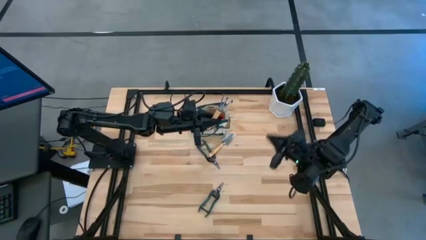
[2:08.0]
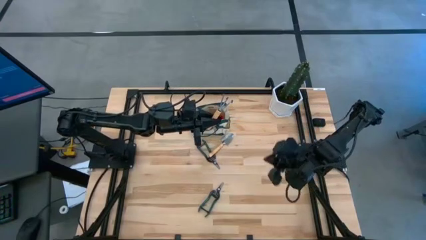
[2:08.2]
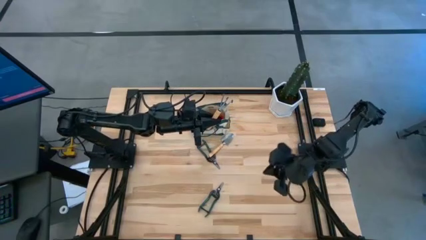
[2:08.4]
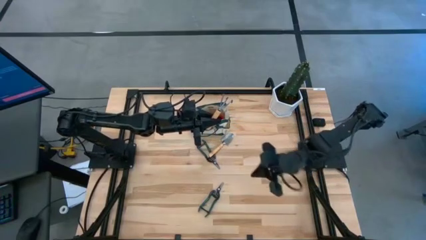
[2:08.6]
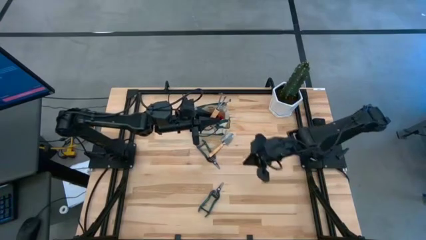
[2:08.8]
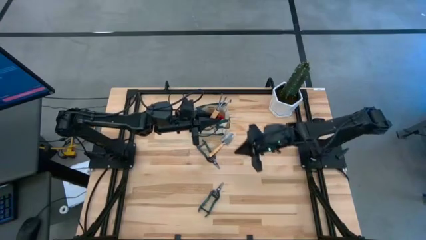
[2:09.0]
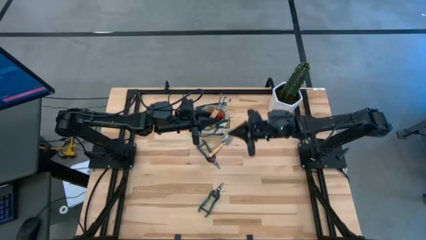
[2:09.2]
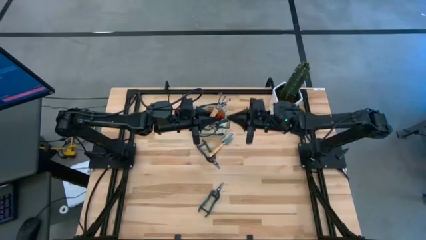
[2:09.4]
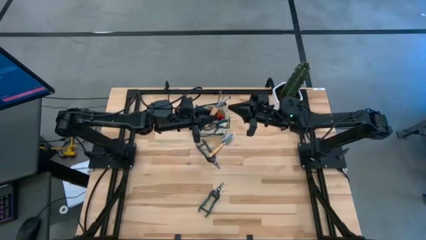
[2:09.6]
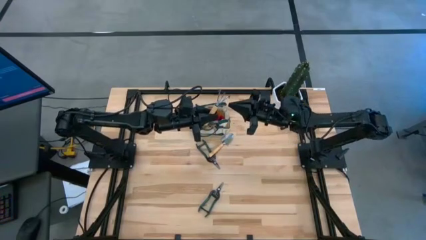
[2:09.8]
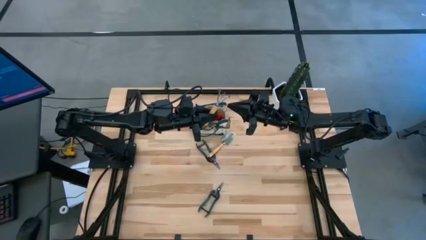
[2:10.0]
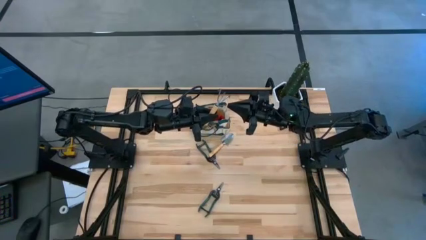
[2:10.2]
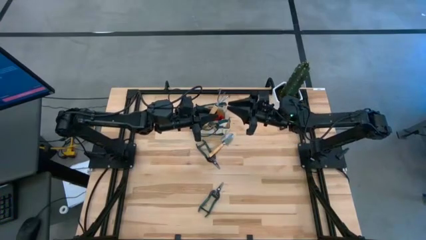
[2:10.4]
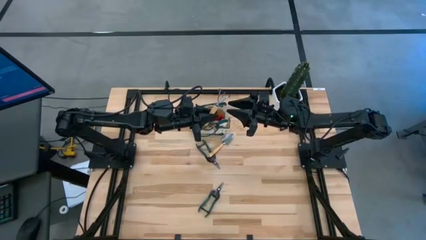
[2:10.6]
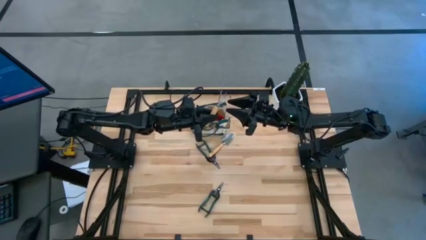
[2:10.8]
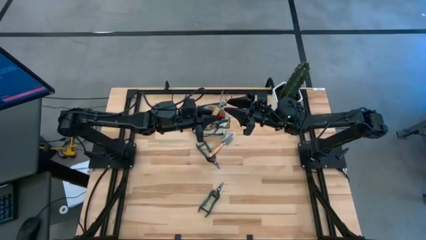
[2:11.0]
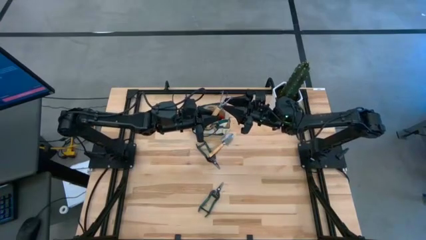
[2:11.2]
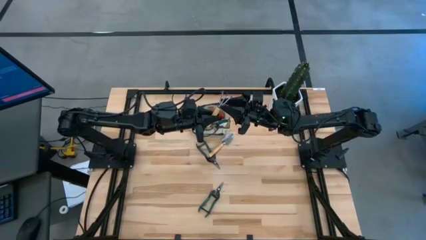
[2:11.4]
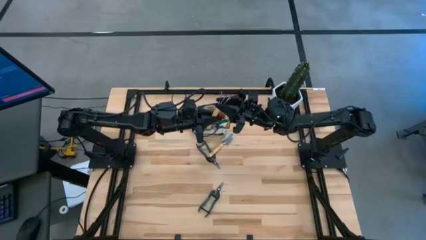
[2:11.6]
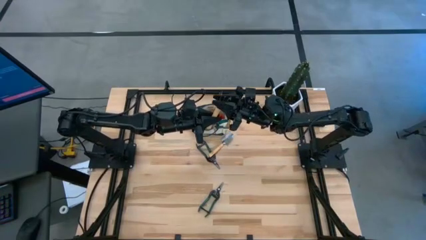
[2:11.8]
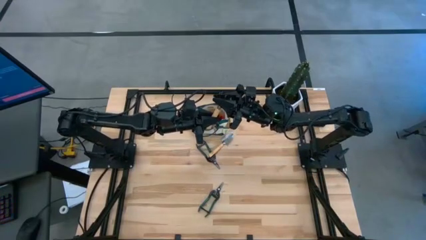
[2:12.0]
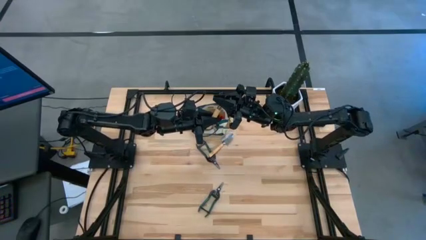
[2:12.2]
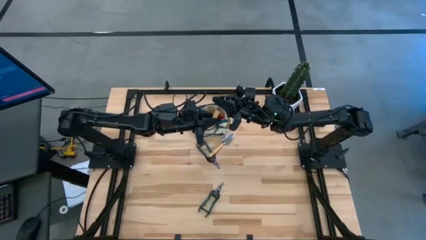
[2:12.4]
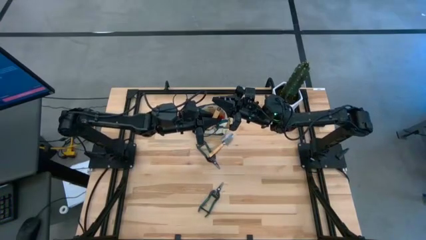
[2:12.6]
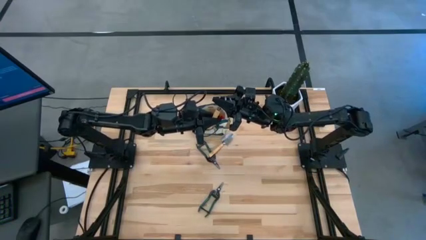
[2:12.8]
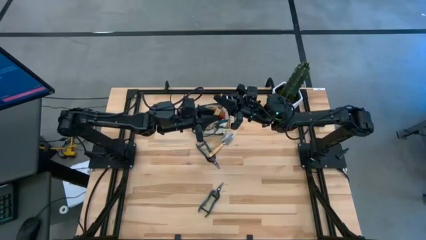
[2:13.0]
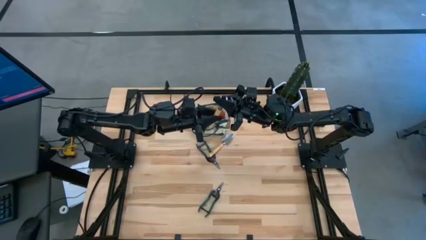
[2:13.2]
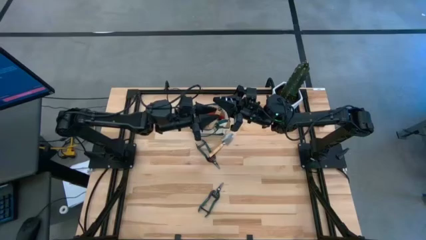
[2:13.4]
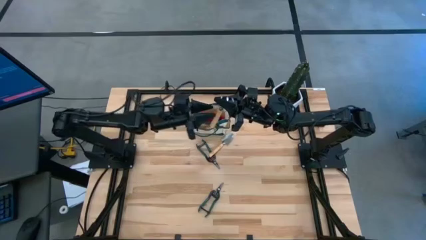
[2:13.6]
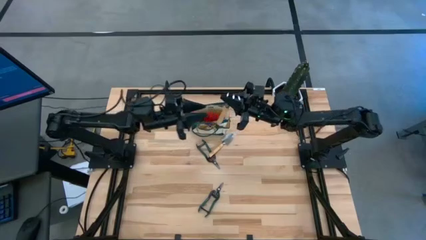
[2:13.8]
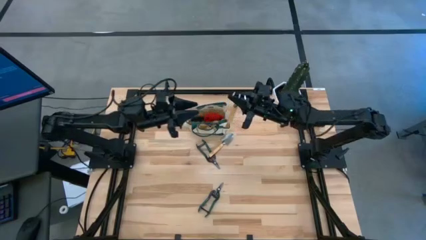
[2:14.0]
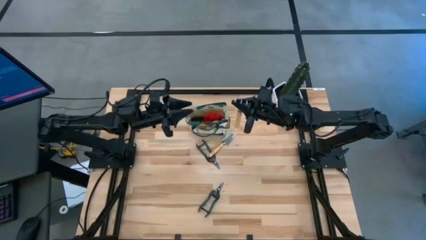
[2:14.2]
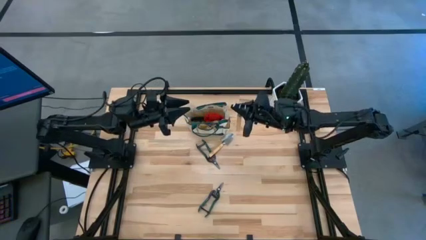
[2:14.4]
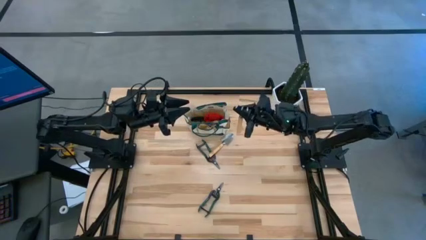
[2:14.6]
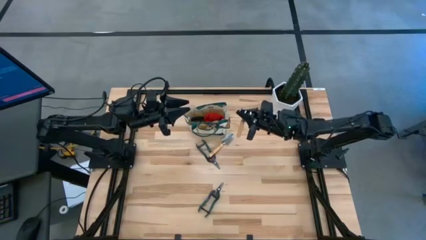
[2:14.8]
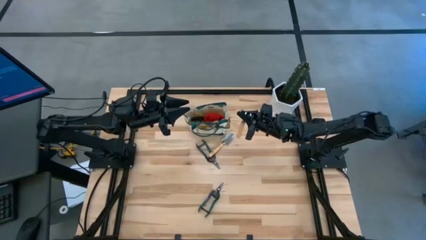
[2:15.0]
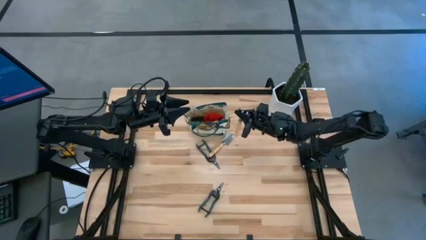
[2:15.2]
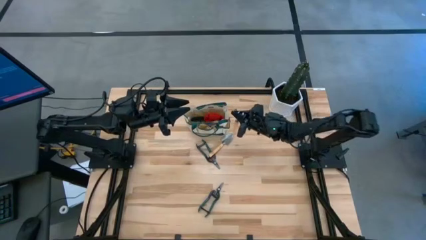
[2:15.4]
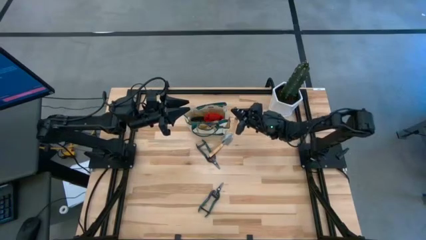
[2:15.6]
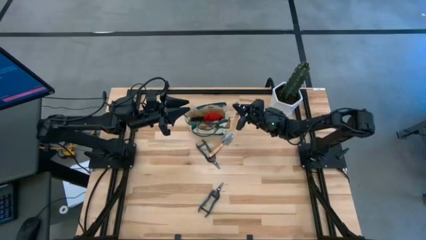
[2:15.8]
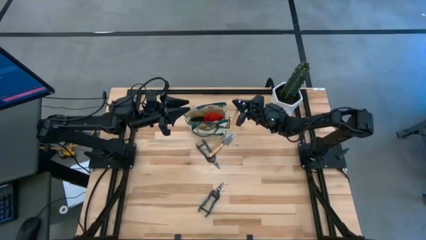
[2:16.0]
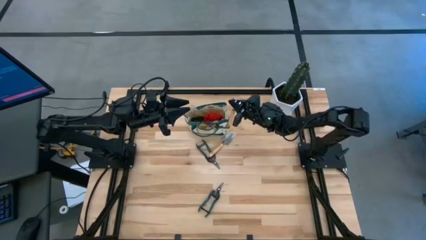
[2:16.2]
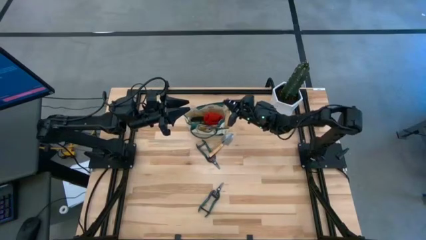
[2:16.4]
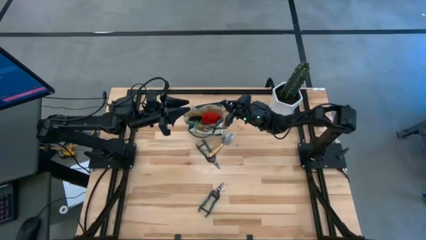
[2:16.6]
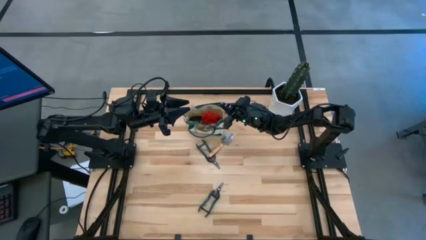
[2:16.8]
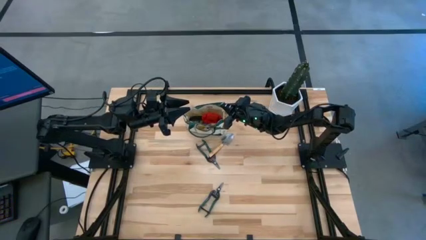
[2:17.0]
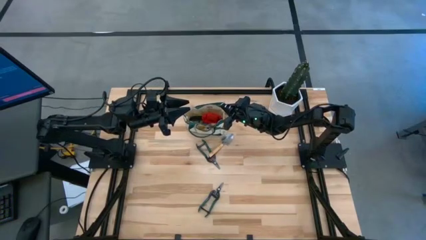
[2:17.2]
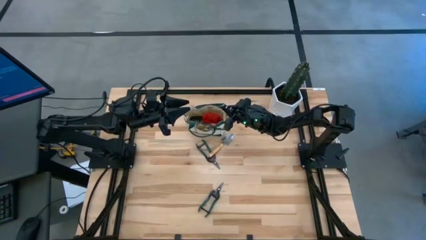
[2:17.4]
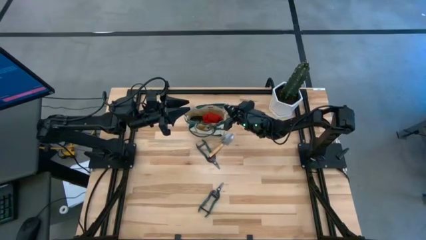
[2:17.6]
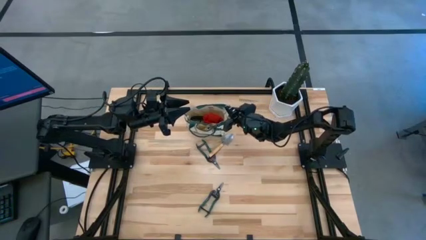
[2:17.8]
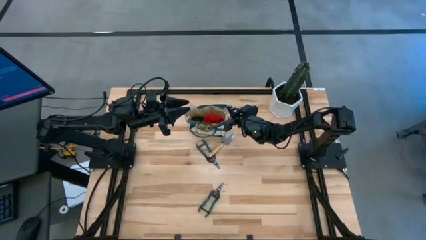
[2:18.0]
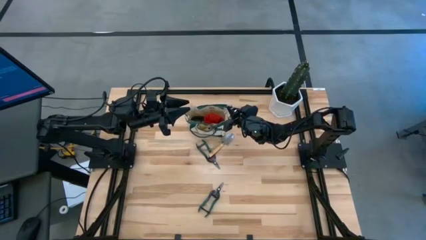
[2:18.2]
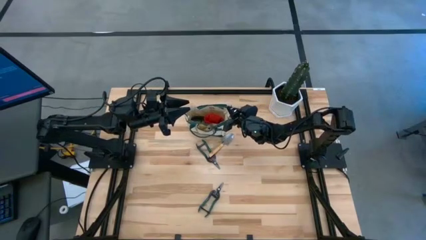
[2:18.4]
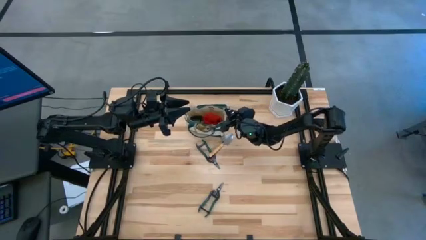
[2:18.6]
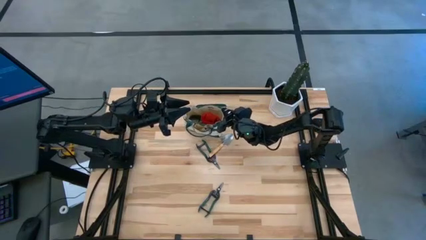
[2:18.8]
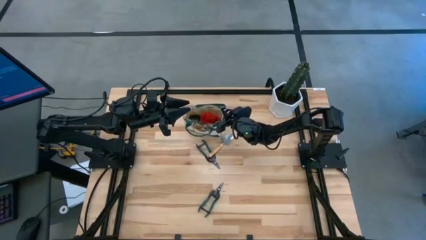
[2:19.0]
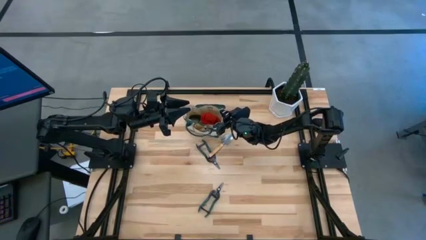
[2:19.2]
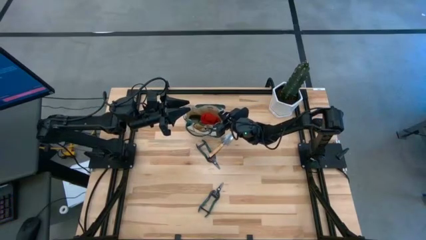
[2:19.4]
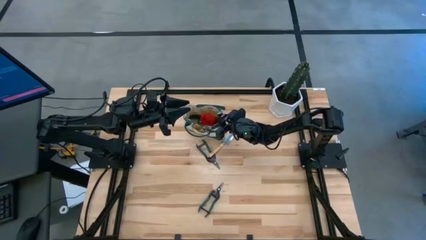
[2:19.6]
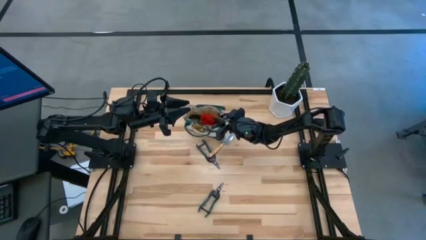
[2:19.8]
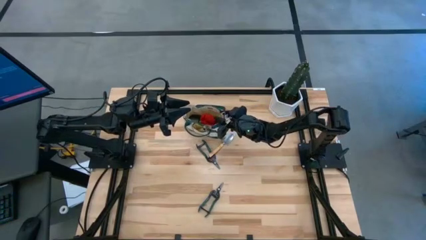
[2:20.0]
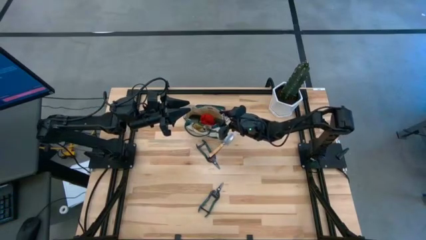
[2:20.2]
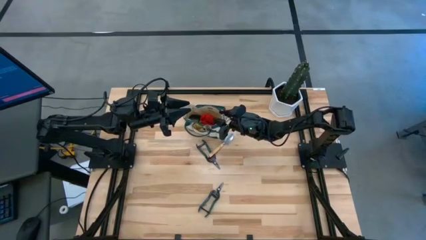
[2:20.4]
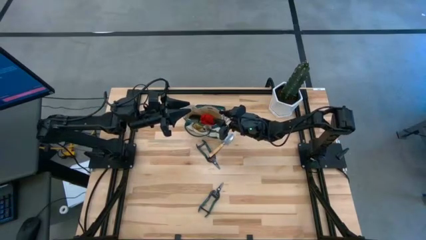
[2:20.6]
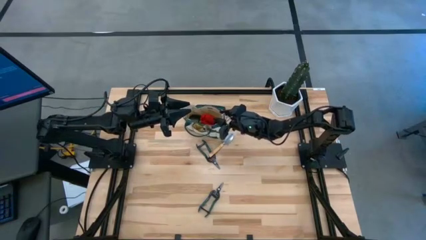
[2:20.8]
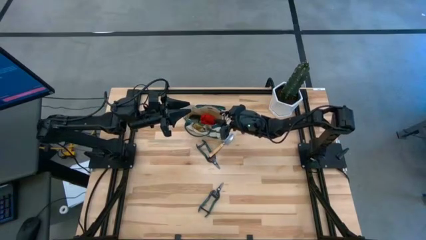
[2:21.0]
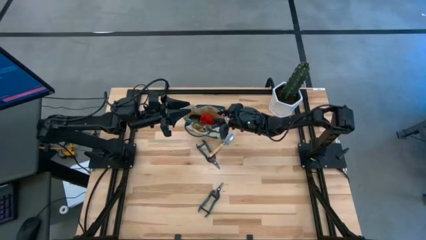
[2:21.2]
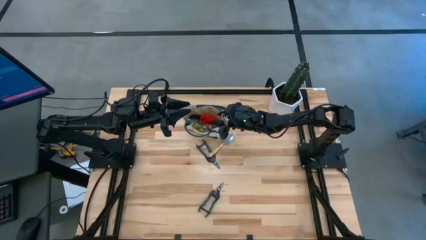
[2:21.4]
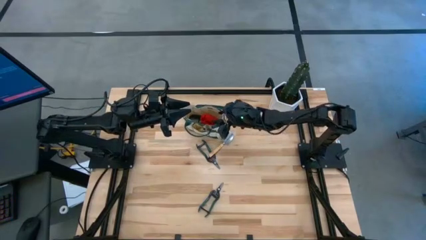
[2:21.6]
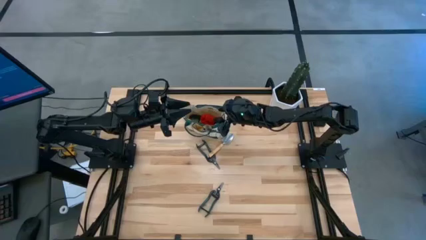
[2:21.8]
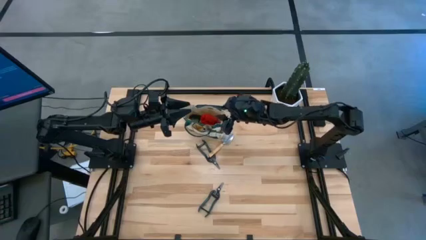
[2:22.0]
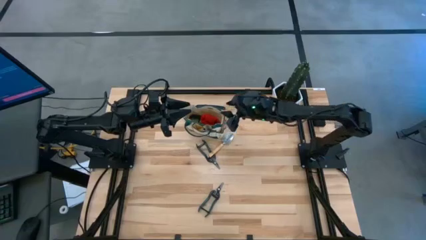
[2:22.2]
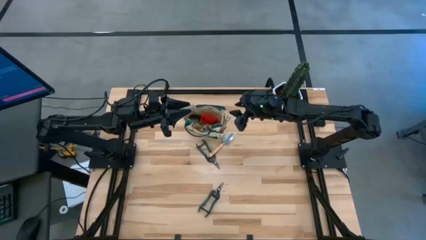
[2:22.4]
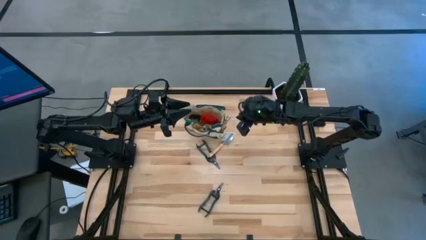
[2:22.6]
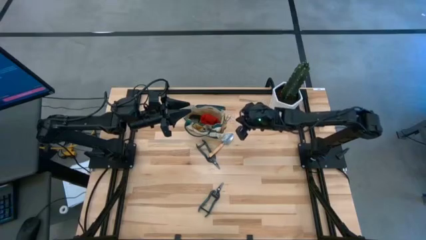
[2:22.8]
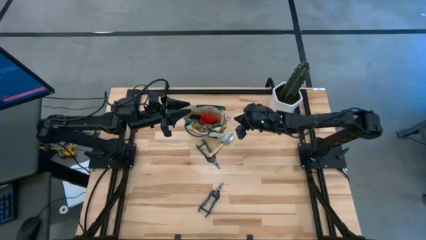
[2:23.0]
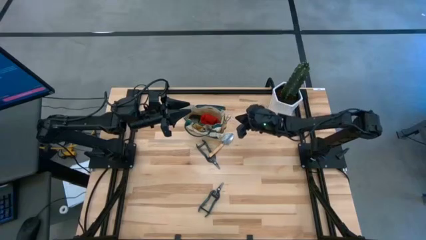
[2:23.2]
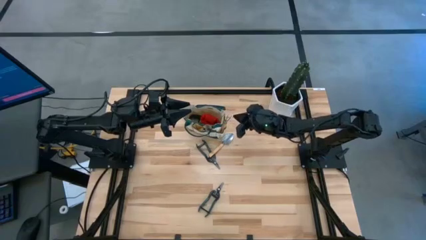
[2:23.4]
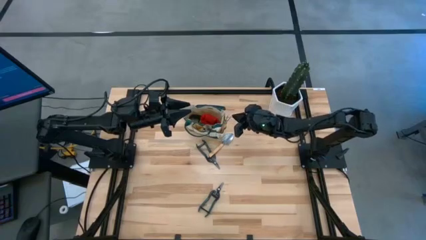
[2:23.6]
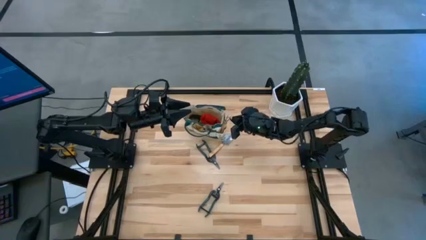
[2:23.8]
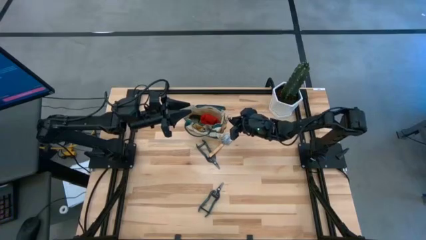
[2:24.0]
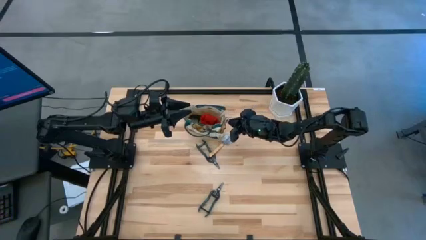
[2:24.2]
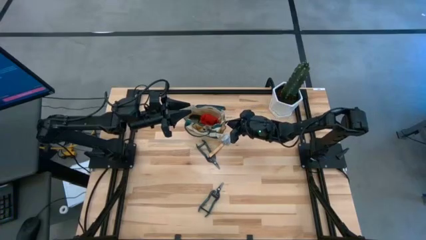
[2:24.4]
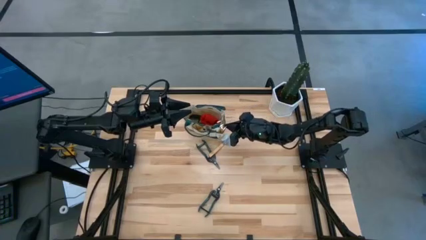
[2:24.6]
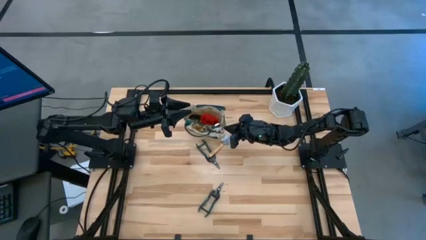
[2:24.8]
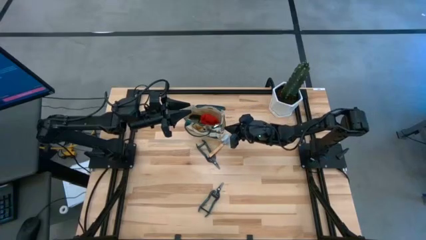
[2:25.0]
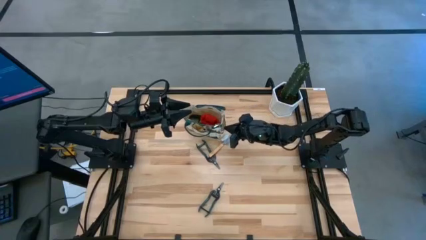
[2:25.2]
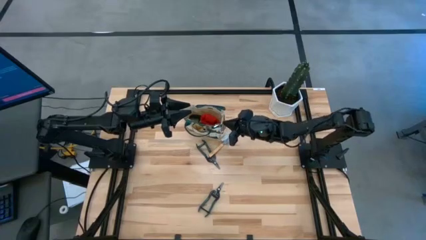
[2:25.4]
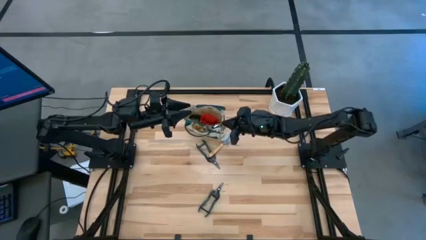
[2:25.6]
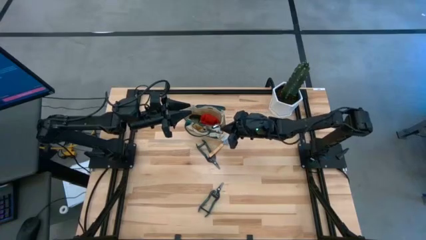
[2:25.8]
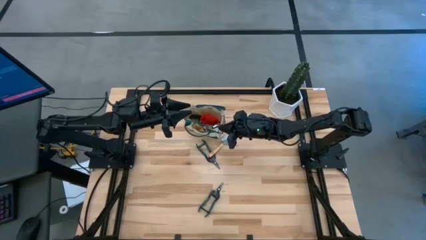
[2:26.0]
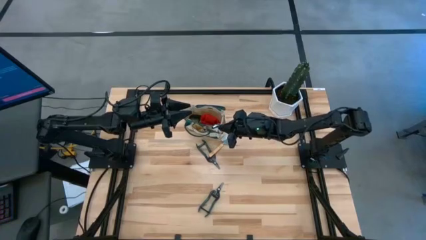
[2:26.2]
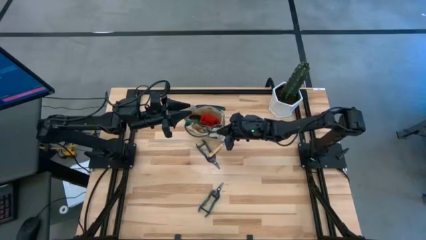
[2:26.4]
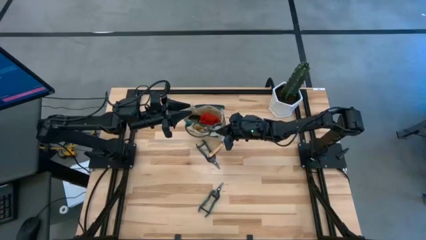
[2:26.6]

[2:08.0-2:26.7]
Task: Pick & Place Garden tools in Gardening bag
Put the brown hand rake into the brown gardening bag
